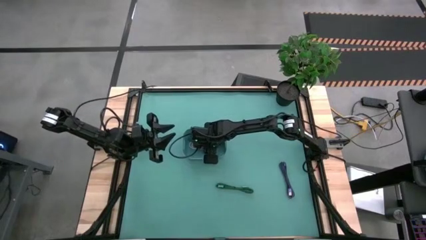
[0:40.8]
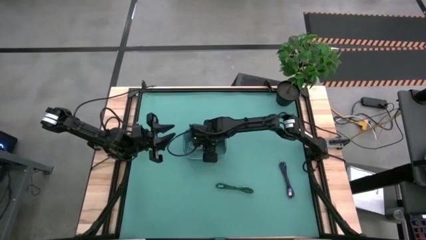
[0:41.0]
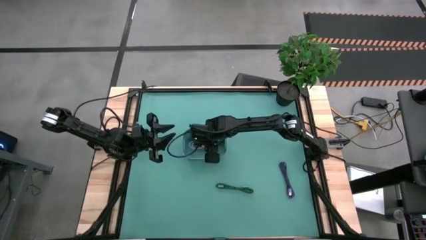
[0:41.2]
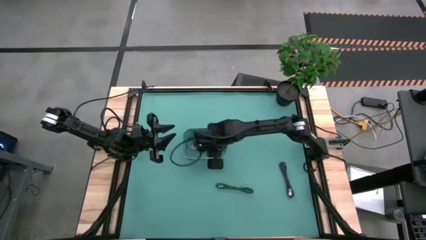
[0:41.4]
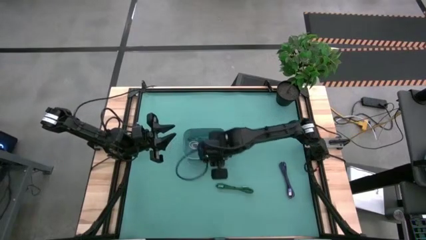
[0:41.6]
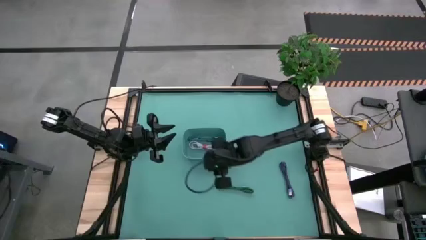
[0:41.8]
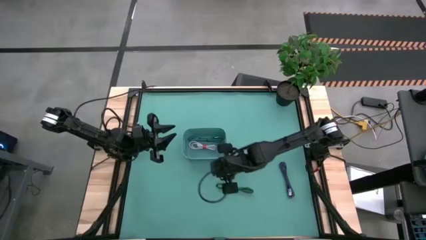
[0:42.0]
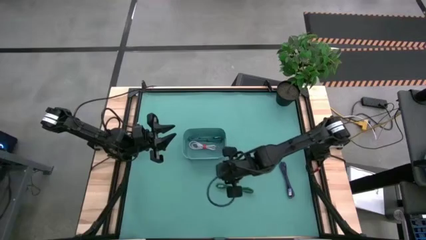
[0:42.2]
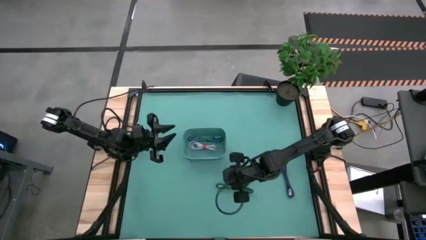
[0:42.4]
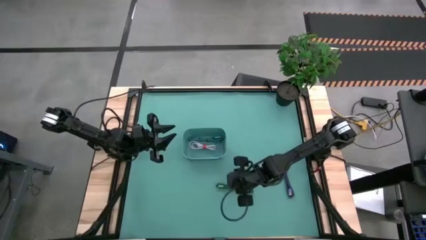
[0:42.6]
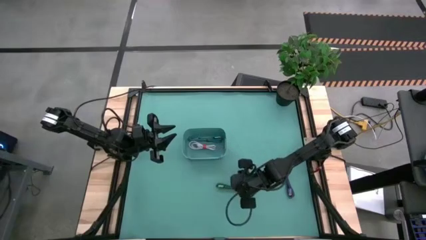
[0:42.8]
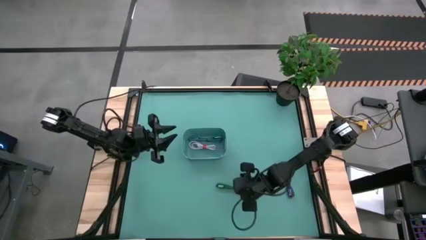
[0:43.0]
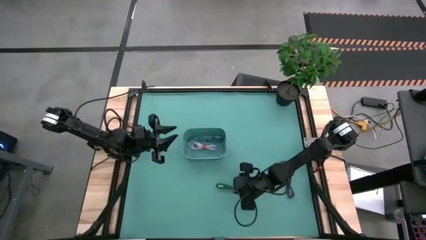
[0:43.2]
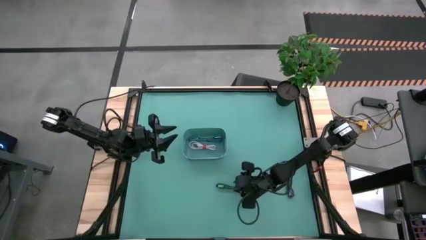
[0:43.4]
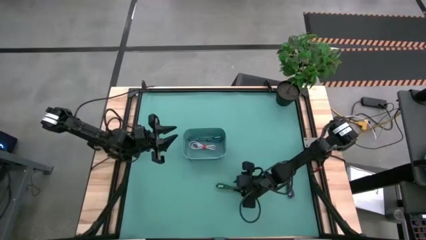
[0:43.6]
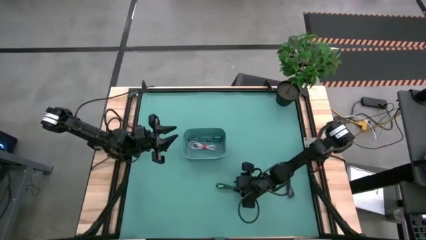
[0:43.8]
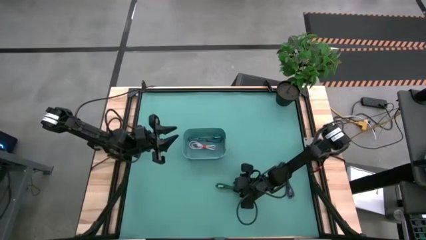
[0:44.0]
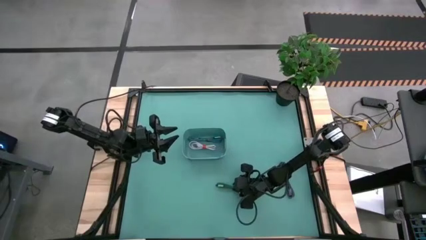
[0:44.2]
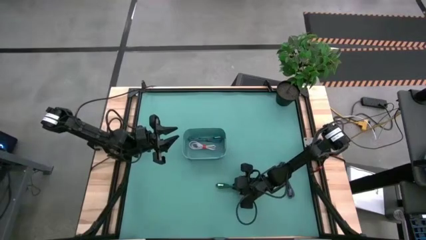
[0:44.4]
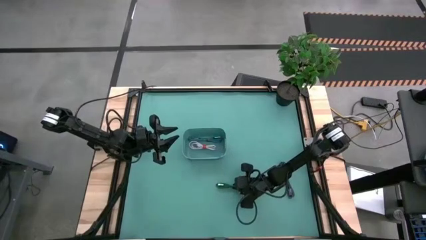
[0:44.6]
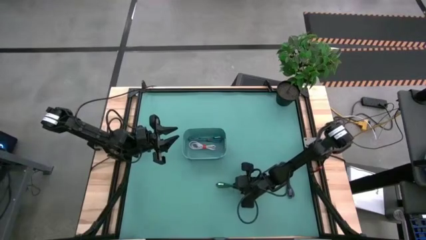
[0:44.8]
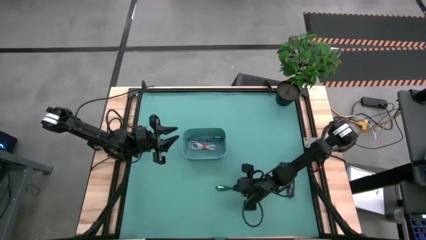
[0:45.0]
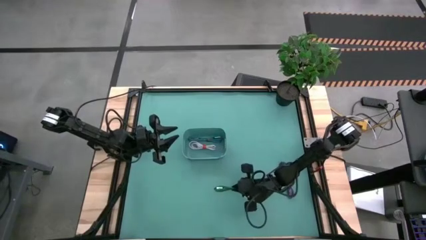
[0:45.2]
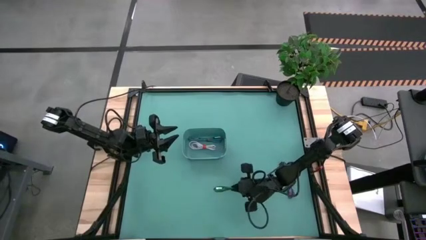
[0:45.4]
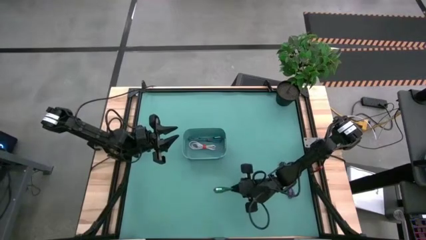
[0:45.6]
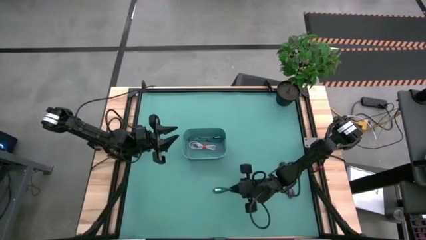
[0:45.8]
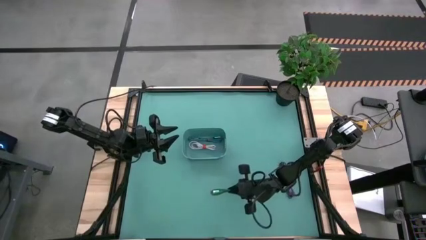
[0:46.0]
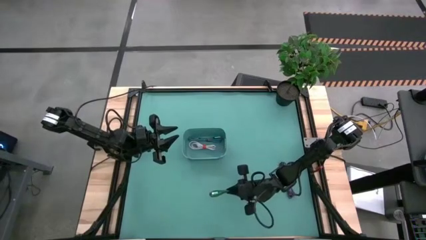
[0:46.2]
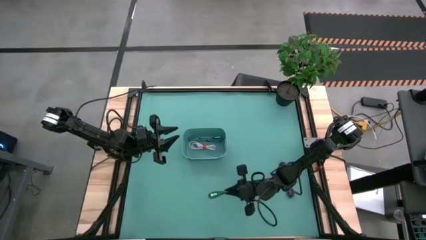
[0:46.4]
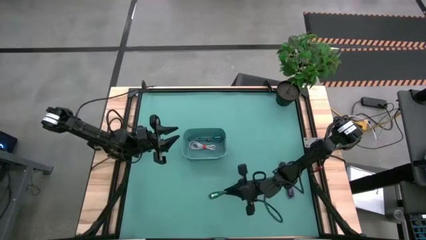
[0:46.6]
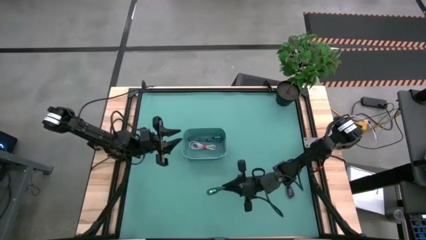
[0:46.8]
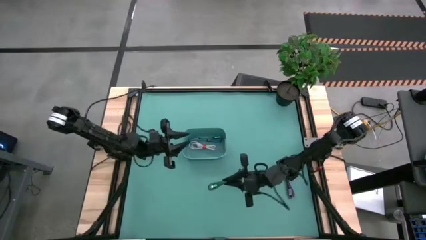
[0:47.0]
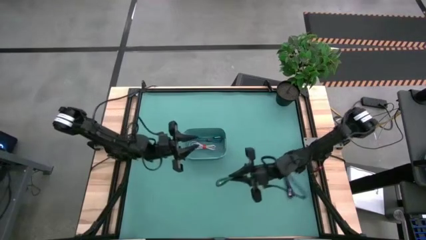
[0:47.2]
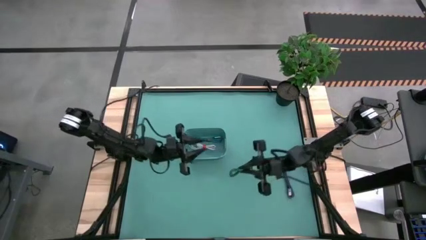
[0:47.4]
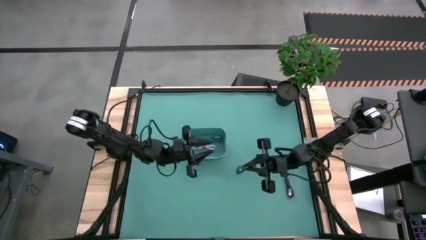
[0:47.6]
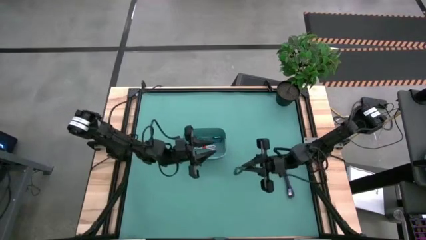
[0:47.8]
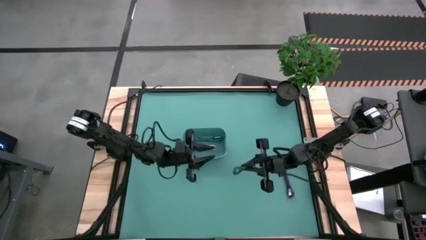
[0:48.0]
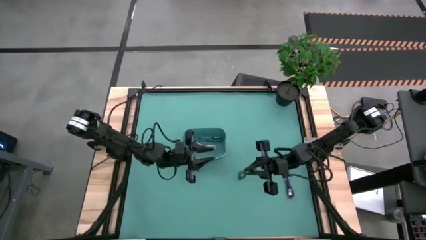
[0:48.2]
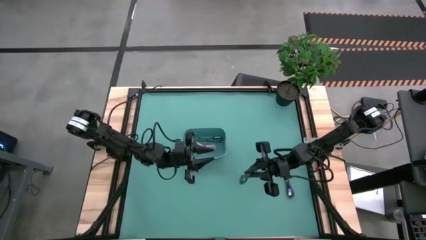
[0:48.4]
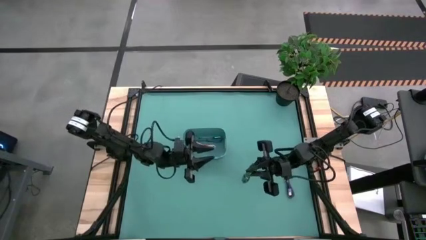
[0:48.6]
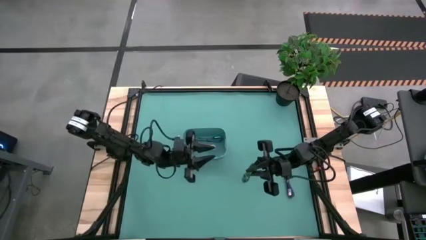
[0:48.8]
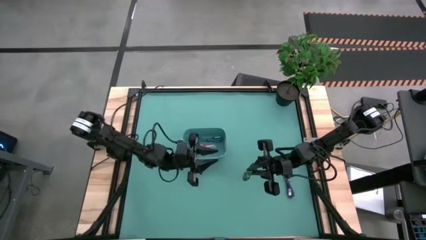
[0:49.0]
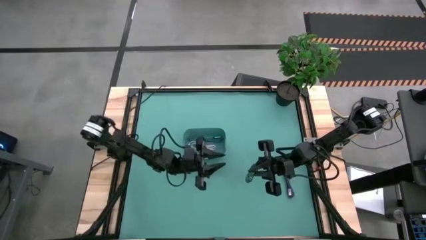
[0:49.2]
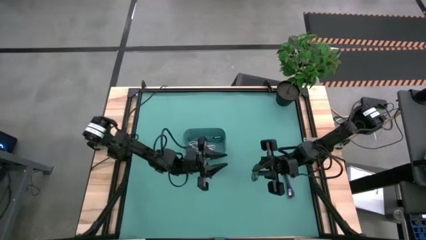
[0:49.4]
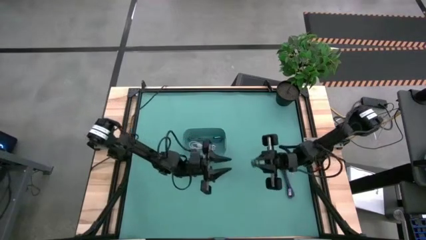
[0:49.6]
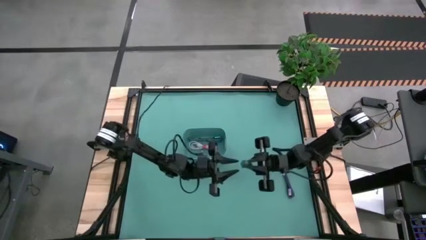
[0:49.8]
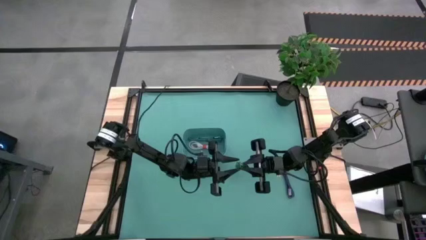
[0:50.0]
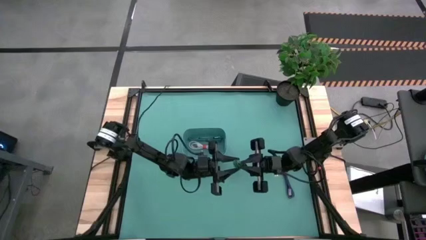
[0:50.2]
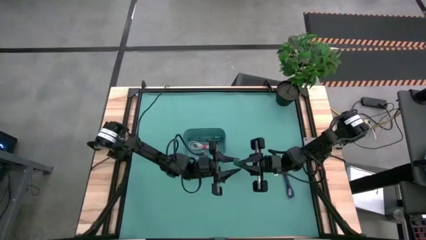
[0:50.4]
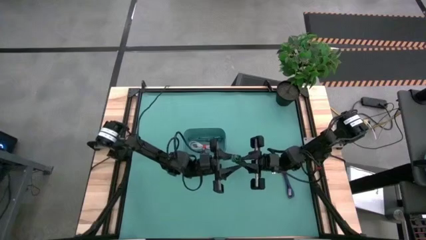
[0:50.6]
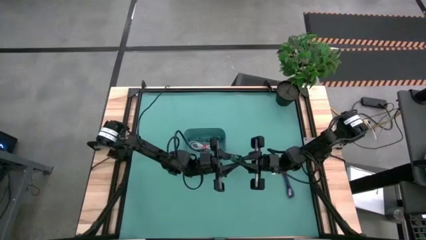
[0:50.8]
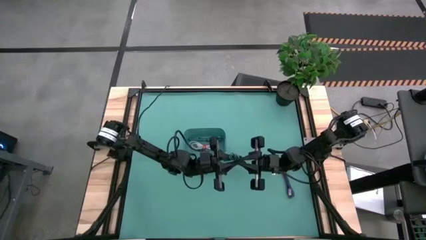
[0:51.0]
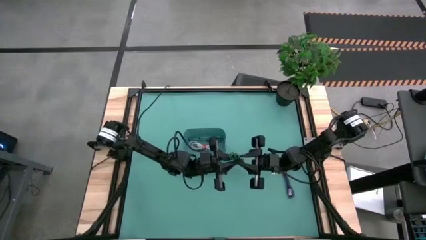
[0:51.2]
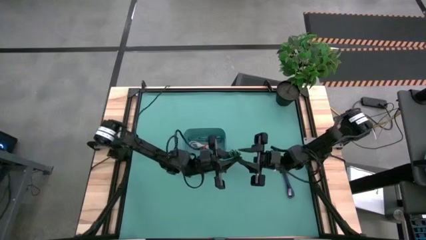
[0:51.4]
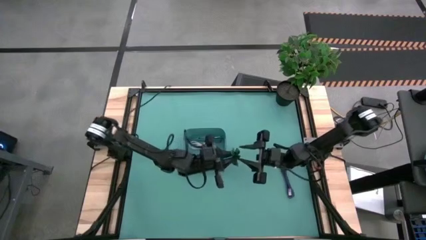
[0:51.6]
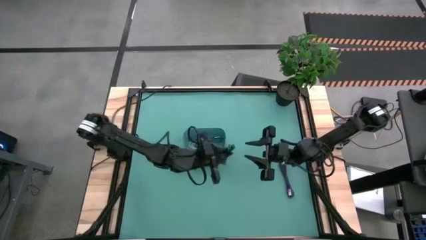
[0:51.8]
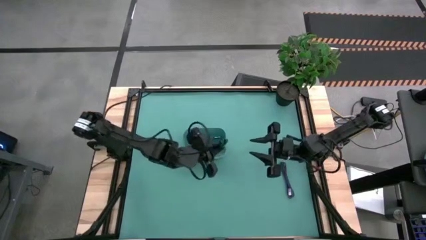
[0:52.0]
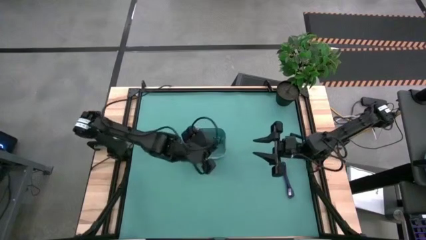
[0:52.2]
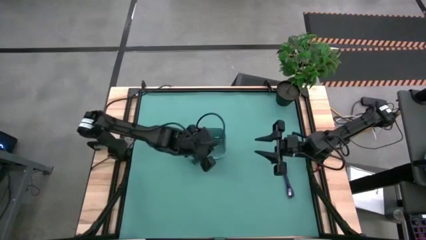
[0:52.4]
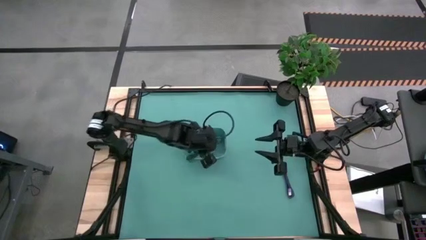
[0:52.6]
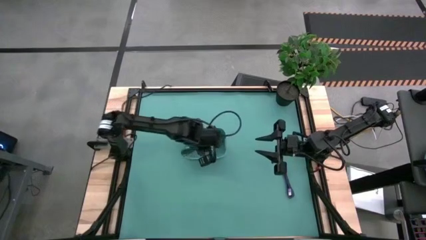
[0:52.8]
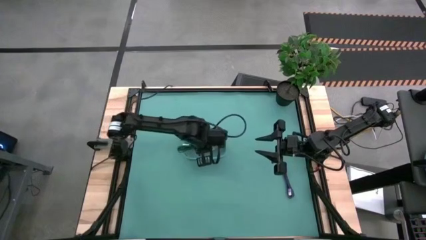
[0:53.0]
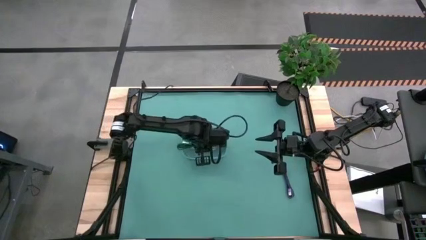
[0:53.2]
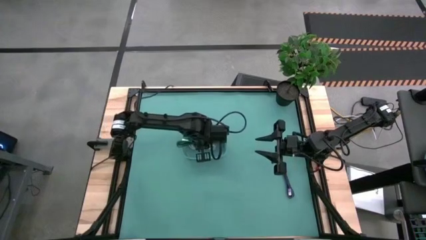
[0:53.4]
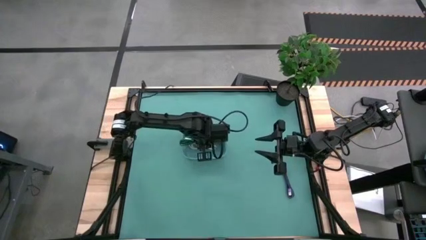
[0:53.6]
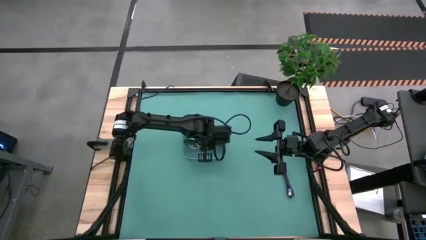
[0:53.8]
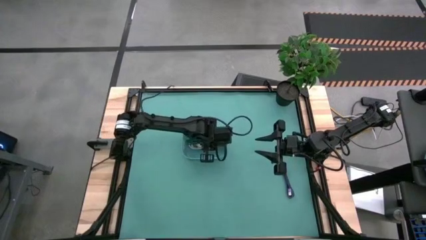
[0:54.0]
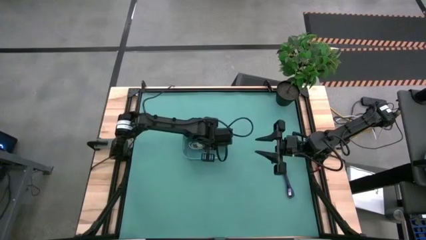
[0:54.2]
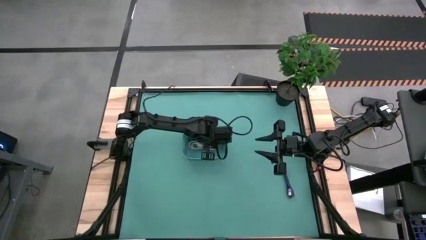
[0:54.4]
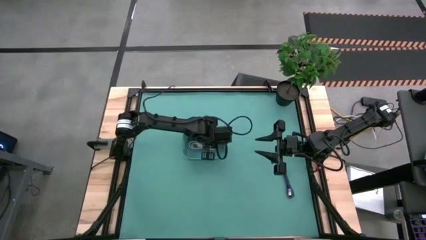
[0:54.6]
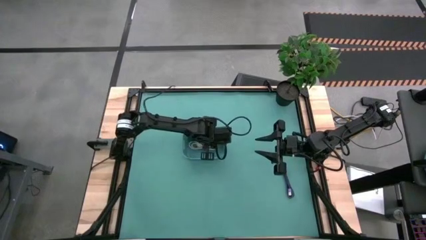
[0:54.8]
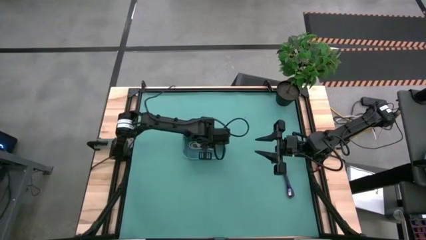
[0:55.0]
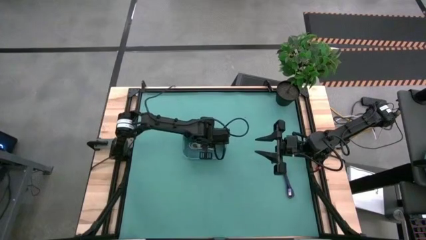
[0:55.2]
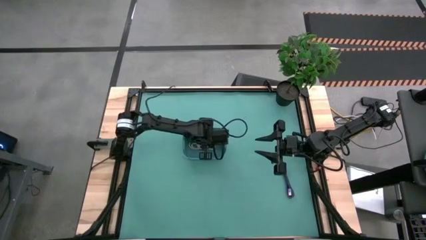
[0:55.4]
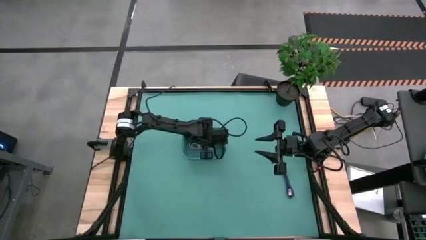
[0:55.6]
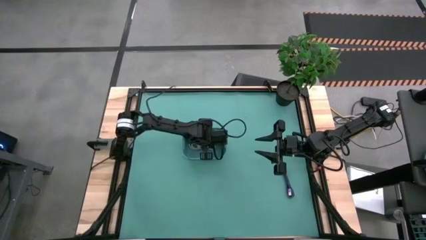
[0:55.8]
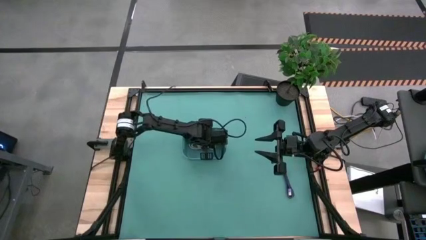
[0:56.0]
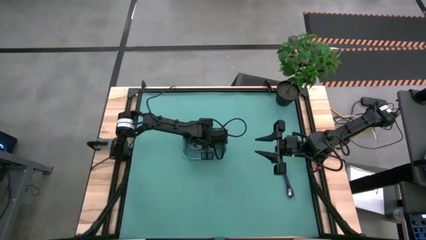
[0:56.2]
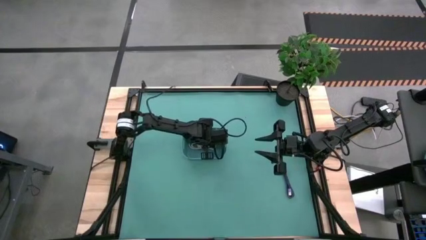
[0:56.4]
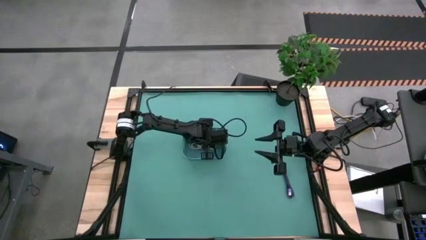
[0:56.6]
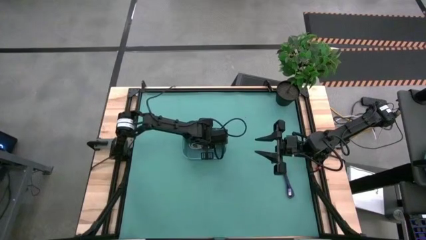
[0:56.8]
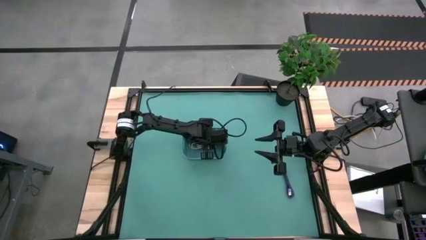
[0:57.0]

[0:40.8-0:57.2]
Task: Pick and place USB-C Cables
Put the green black charger cable into the green bin
